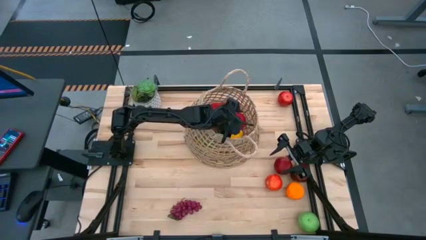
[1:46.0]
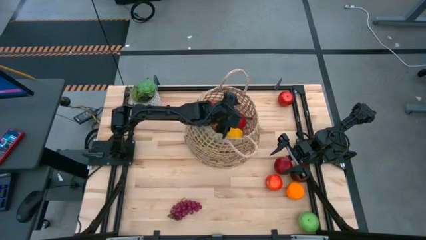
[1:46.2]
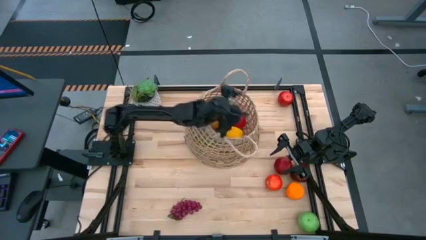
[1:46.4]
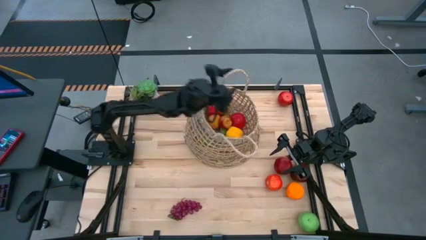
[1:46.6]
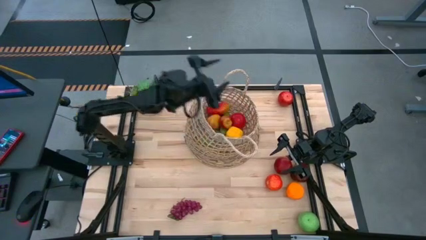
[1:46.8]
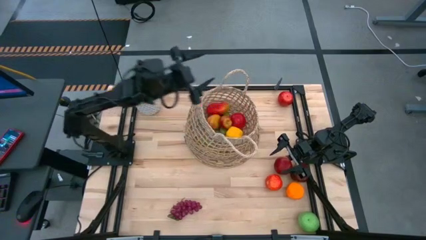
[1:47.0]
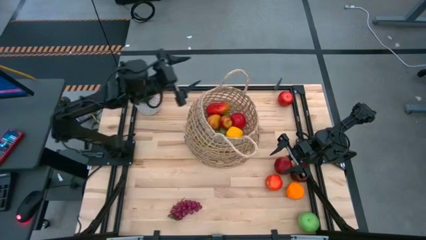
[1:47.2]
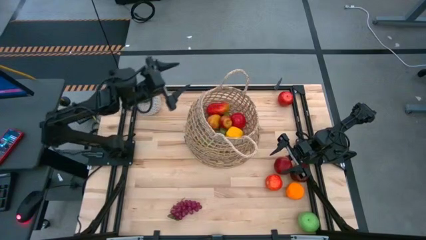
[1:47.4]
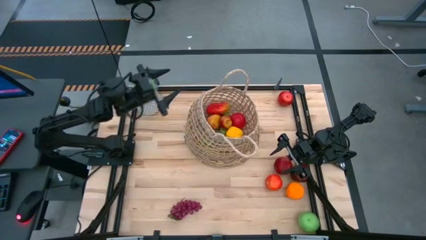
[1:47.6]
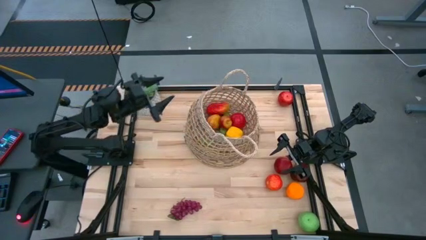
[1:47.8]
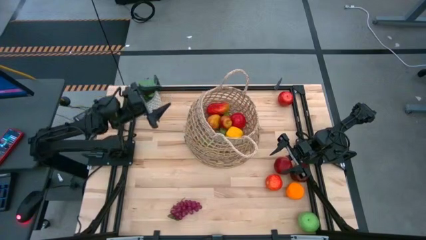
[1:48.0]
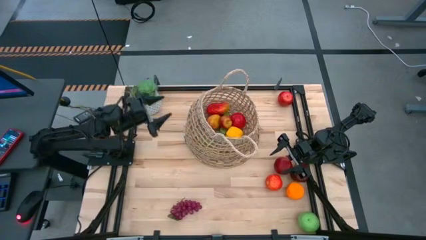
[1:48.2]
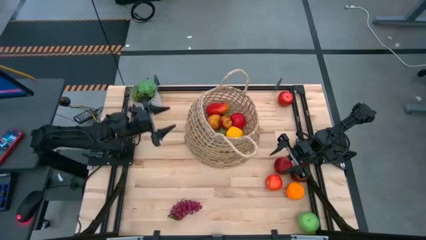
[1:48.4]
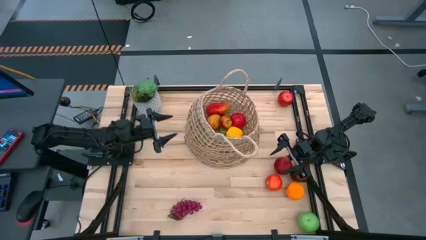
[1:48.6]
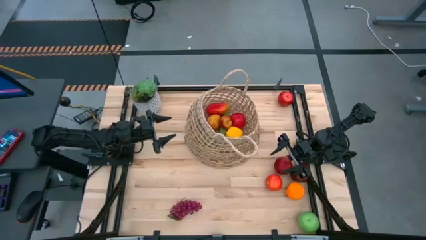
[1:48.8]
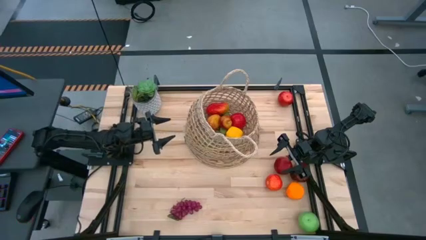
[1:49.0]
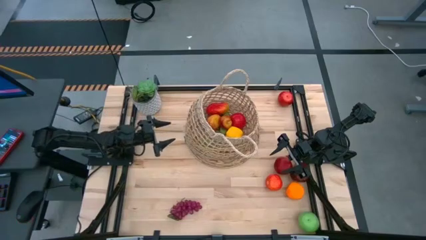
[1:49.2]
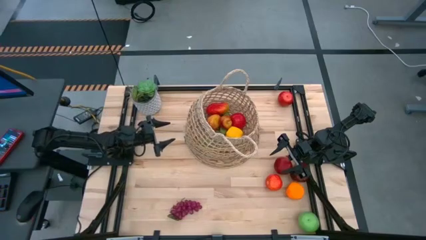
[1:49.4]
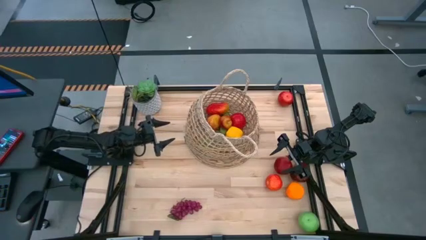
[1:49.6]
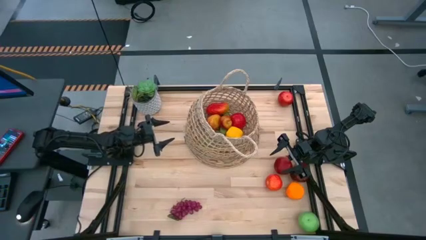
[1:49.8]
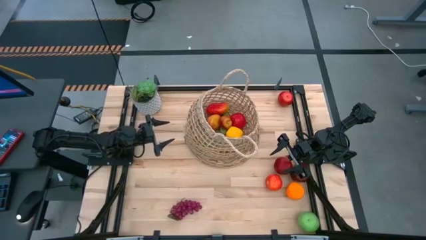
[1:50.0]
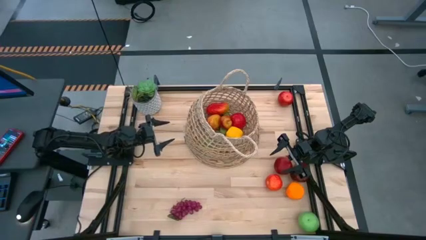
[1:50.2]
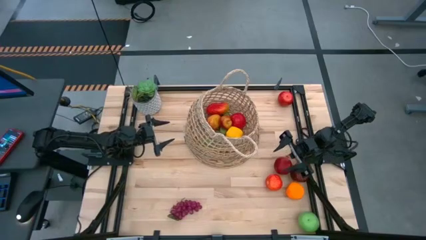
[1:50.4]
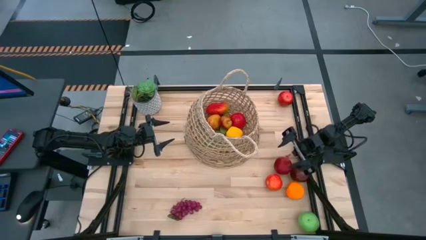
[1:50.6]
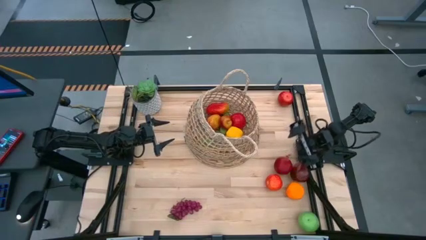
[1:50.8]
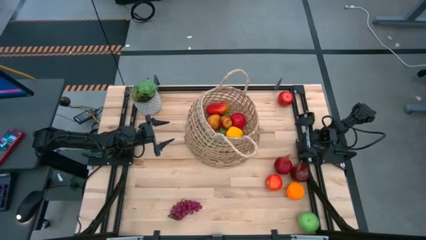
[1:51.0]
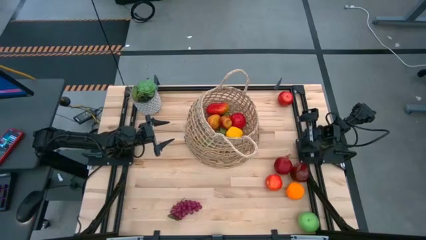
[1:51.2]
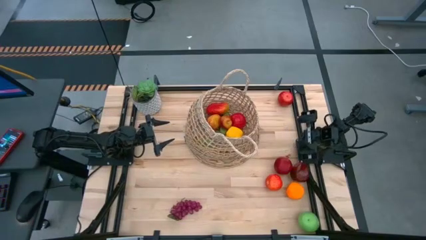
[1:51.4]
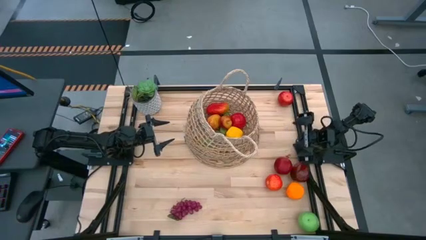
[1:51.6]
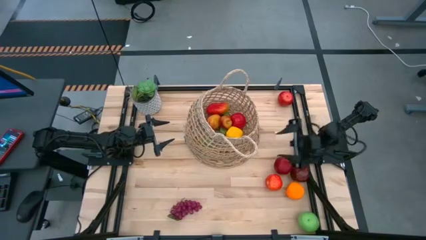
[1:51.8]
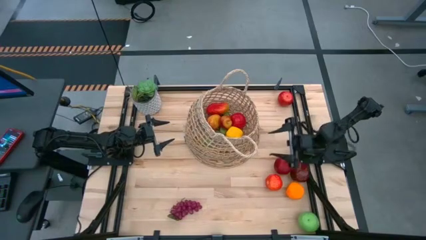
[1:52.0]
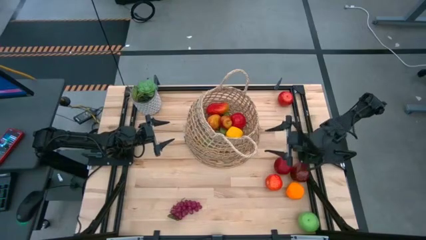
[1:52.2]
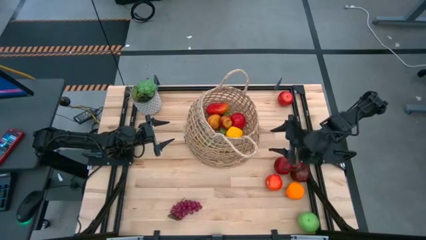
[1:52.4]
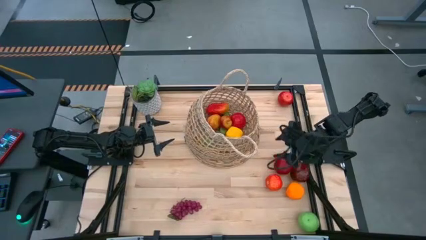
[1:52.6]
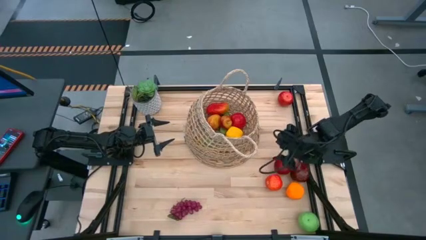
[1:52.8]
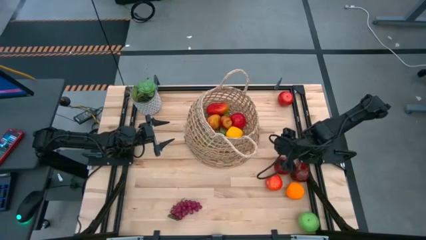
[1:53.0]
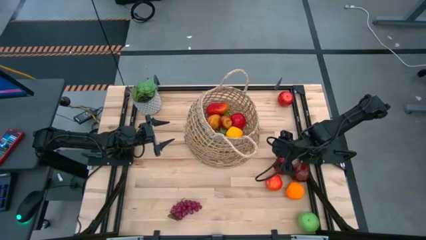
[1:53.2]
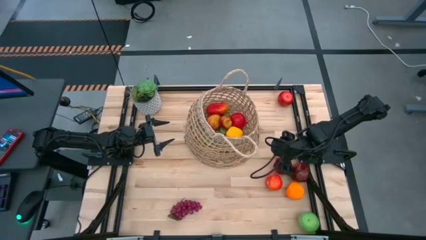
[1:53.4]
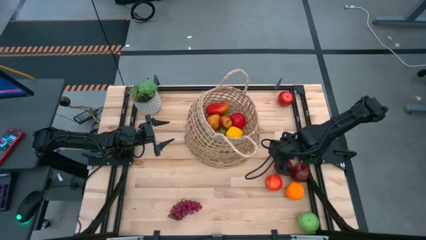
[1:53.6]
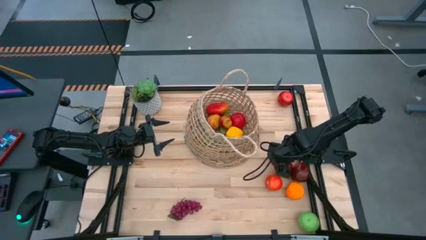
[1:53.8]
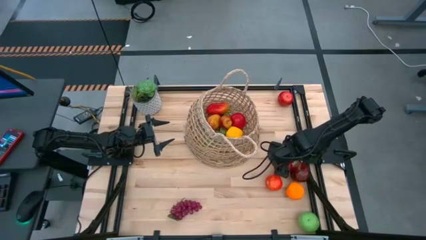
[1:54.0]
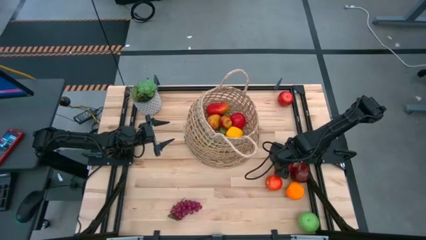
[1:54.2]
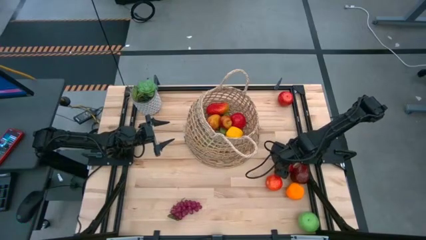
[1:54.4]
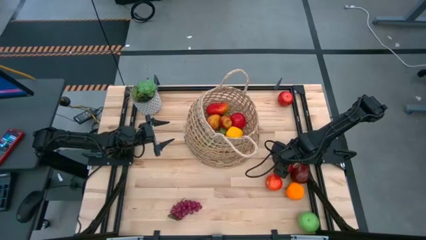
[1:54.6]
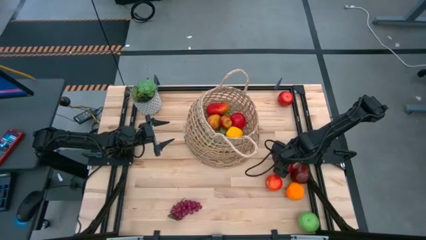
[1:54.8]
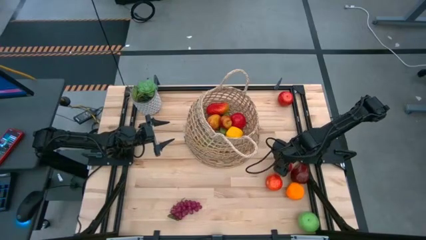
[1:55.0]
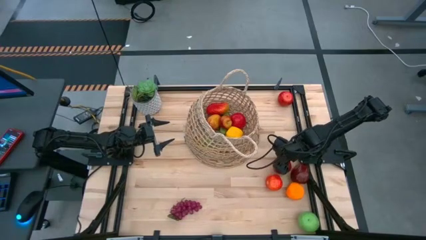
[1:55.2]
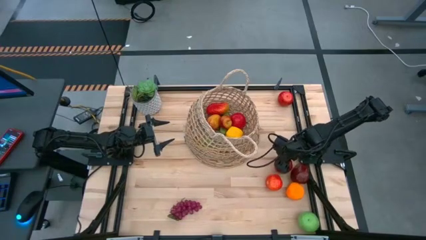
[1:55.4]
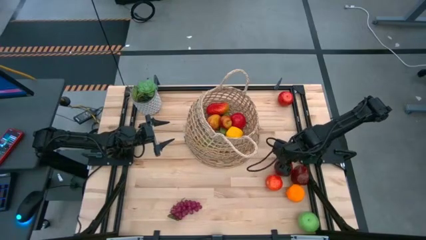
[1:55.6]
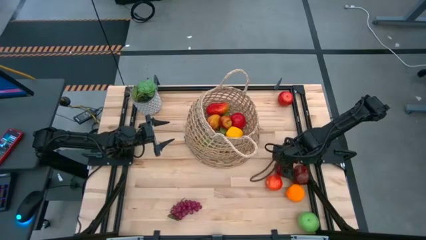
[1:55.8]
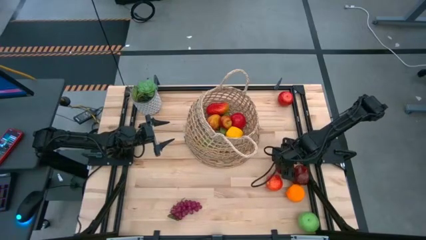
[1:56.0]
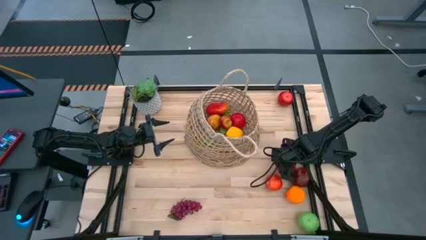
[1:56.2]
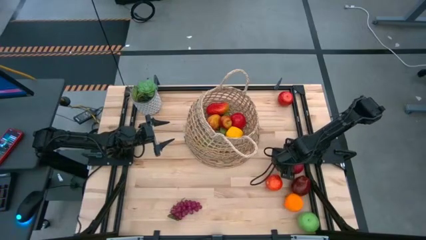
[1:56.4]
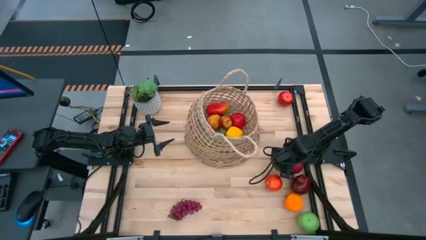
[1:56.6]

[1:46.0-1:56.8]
Task: Build produce basket
Put the red pomegranate into the brown basket

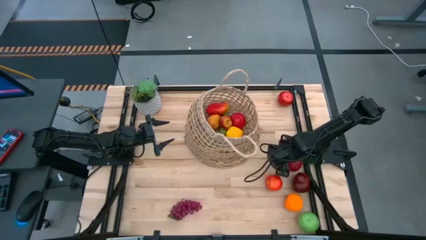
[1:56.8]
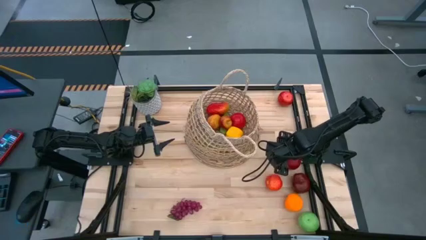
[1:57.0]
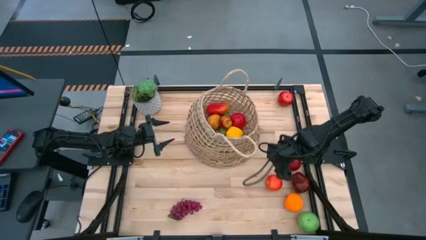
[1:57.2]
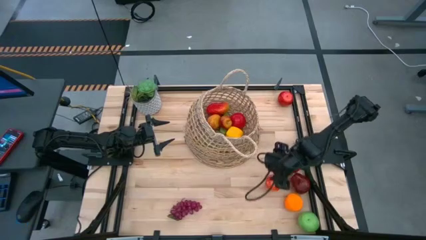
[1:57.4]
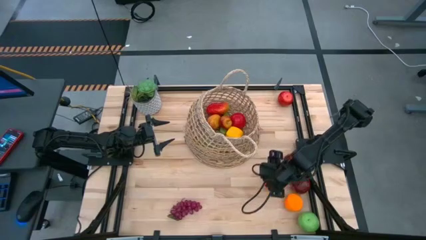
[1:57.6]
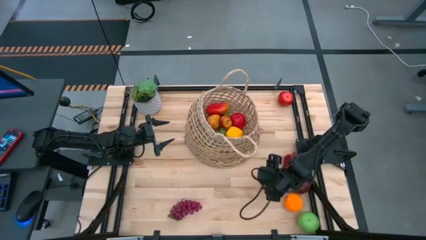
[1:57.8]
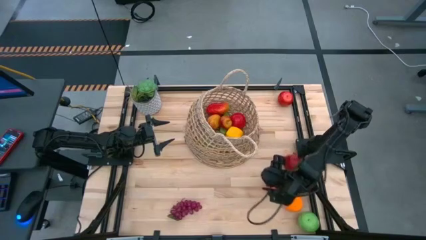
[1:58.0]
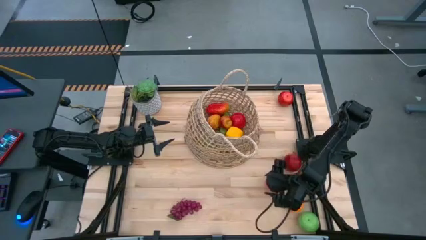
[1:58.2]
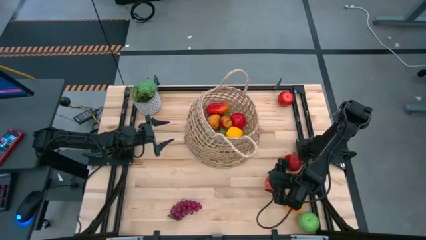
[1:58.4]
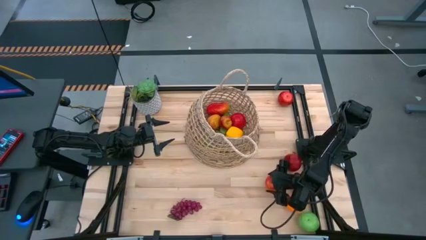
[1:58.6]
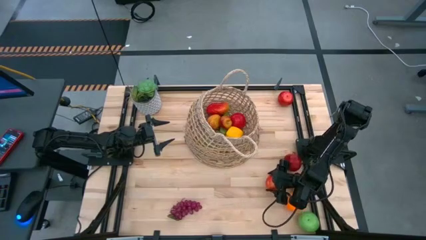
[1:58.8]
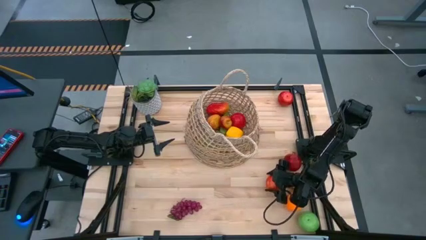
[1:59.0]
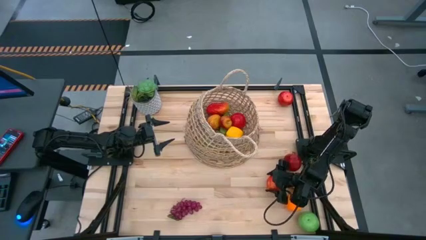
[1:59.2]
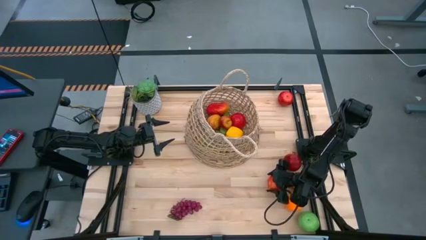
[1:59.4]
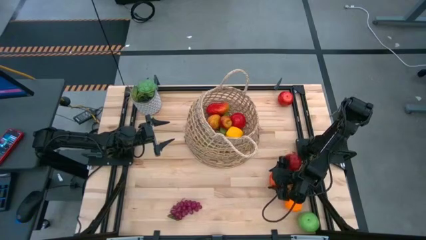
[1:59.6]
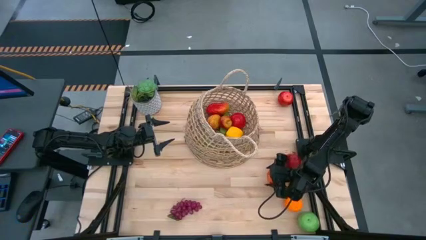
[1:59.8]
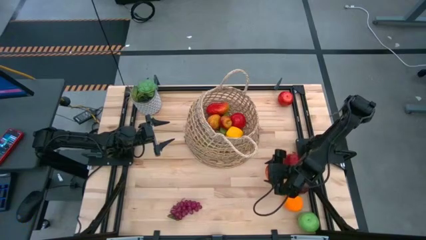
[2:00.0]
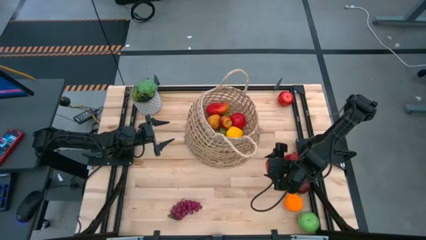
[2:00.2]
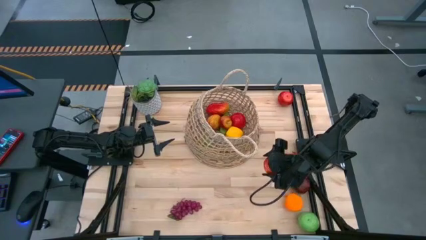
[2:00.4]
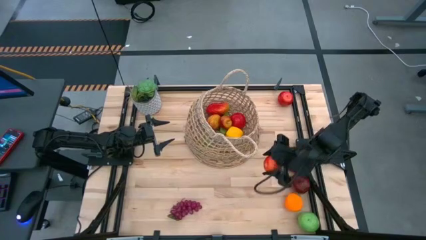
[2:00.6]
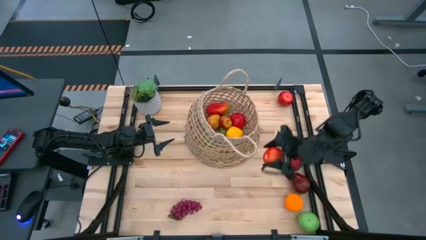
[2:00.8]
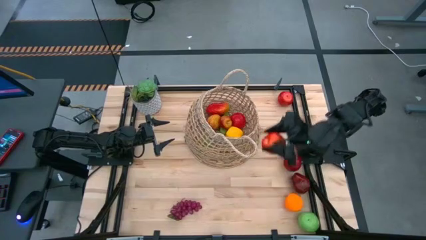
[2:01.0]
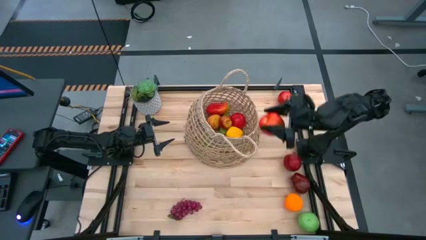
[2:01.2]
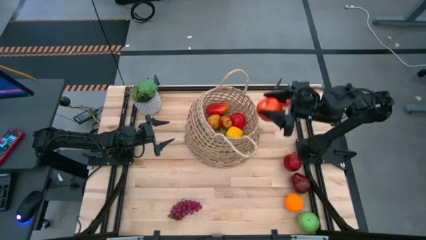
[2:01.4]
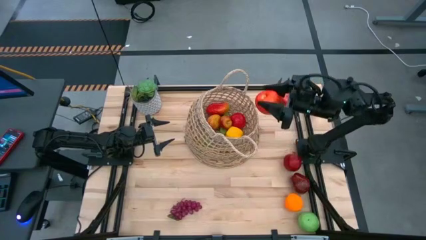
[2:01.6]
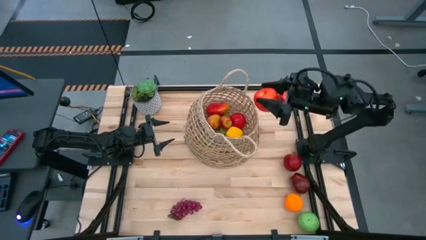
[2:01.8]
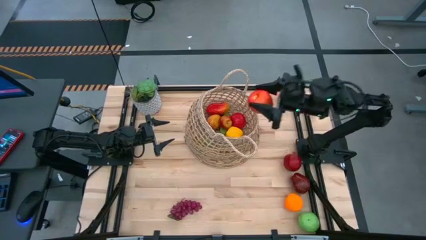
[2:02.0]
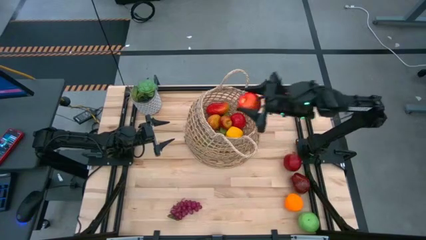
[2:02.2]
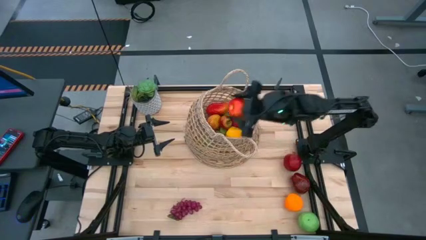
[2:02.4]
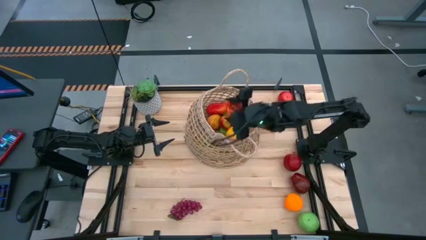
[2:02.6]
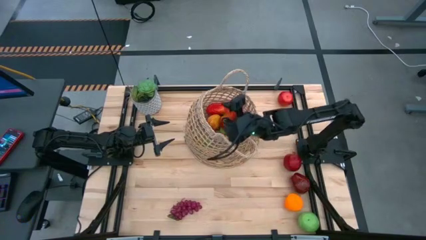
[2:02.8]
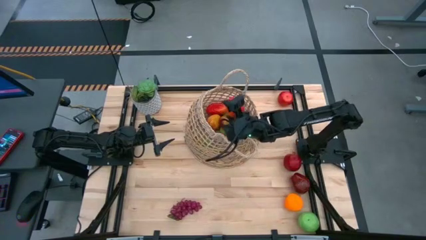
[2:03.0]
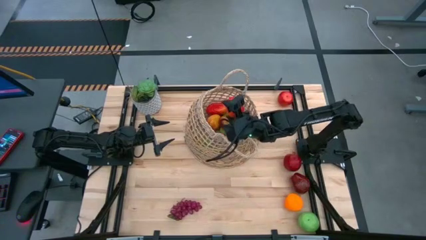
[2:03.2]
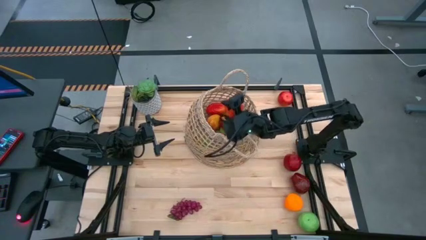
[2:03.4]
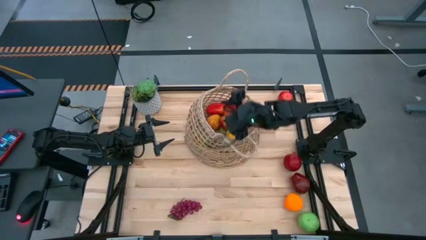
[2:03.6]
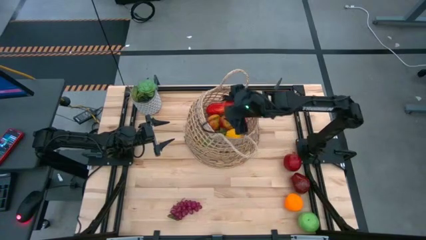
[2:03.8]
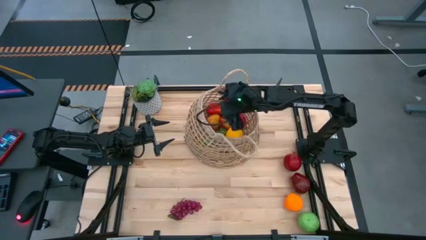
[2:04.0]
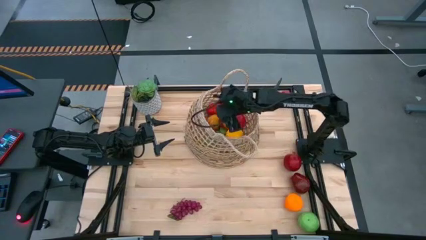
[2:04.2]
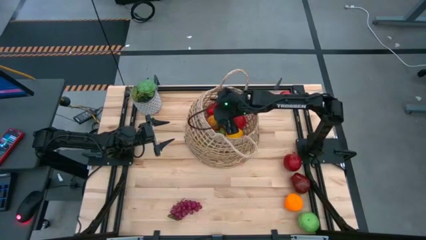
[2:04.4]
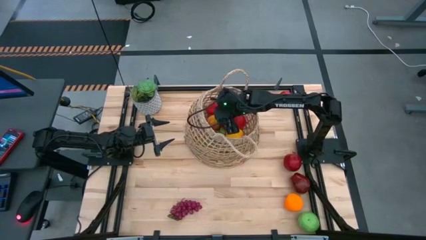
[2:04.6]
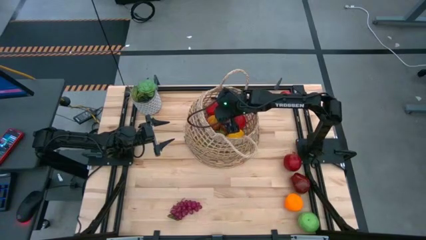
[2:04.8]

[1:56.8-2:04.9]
Put the red apple into the brown basket
